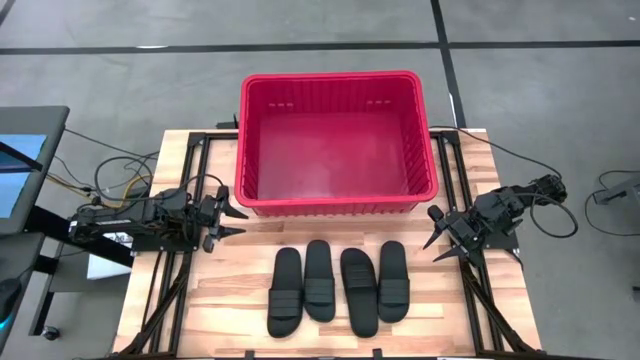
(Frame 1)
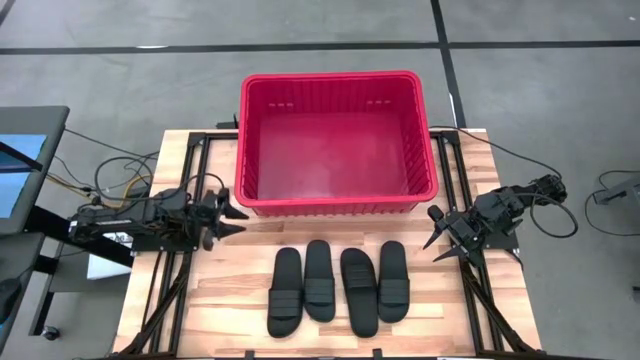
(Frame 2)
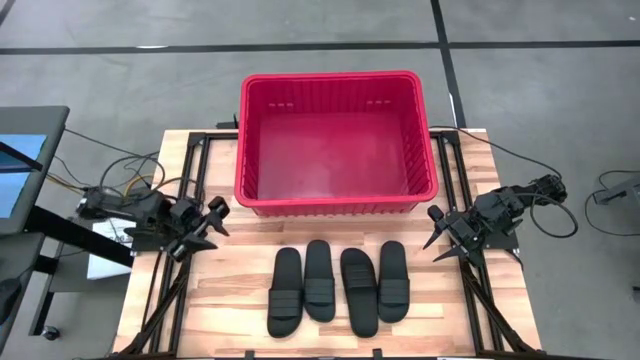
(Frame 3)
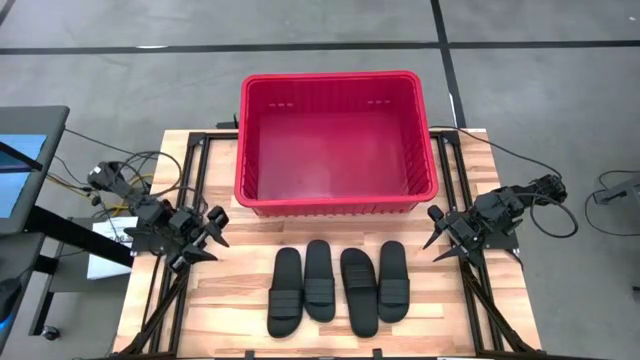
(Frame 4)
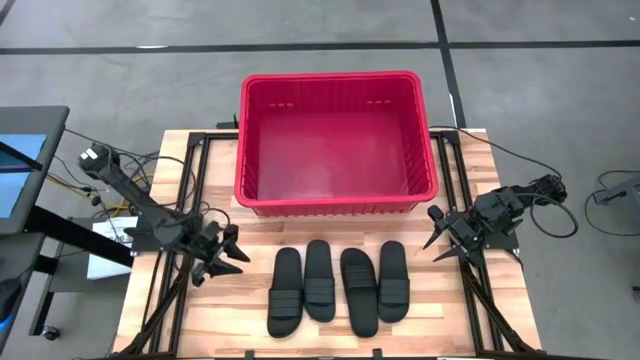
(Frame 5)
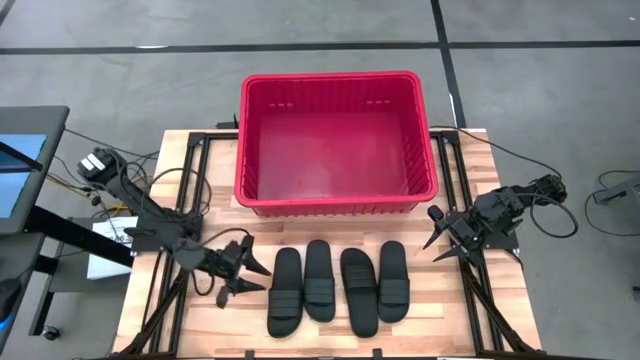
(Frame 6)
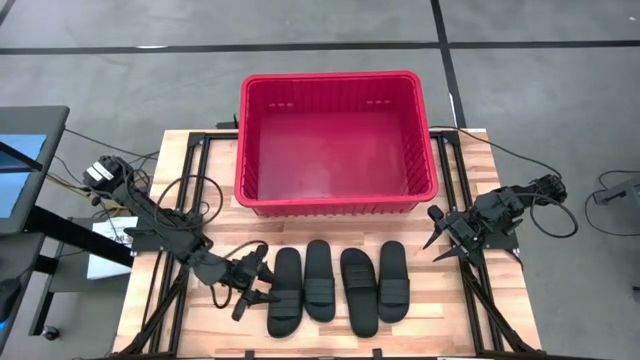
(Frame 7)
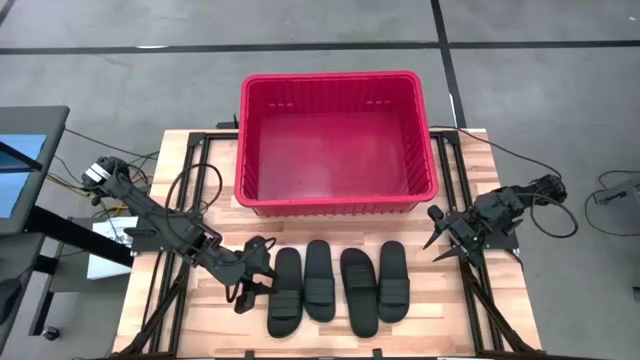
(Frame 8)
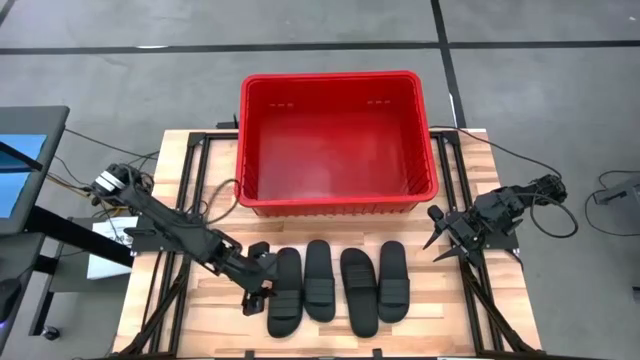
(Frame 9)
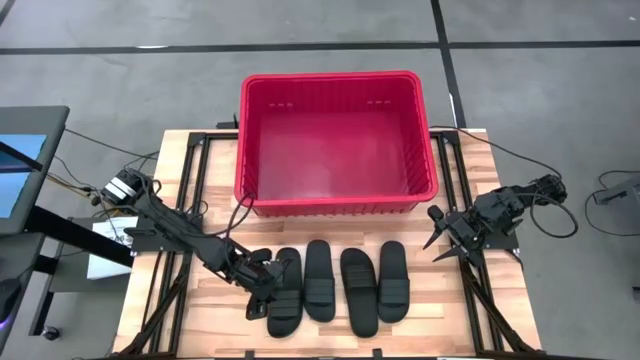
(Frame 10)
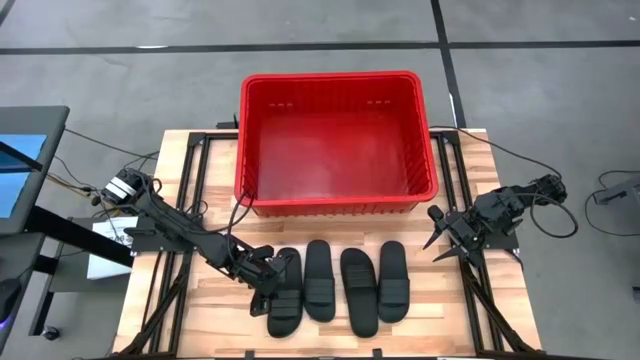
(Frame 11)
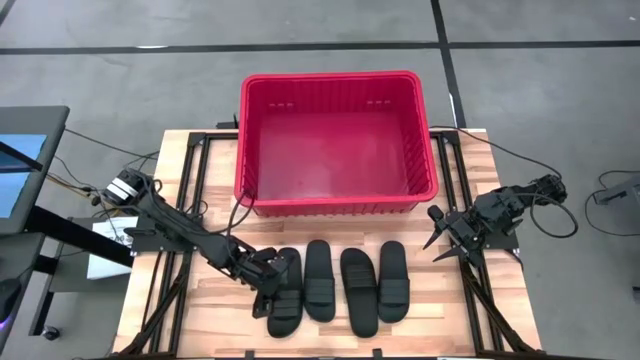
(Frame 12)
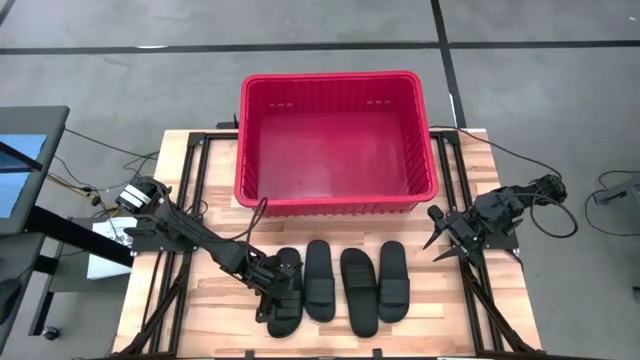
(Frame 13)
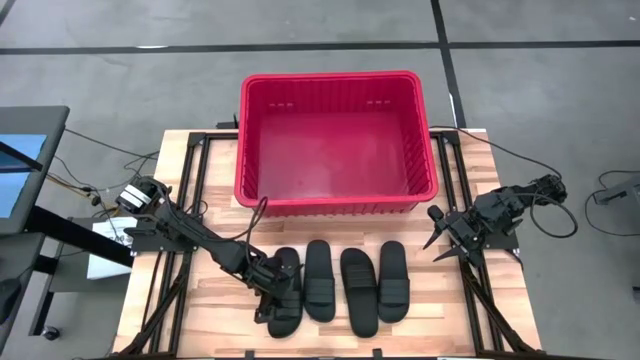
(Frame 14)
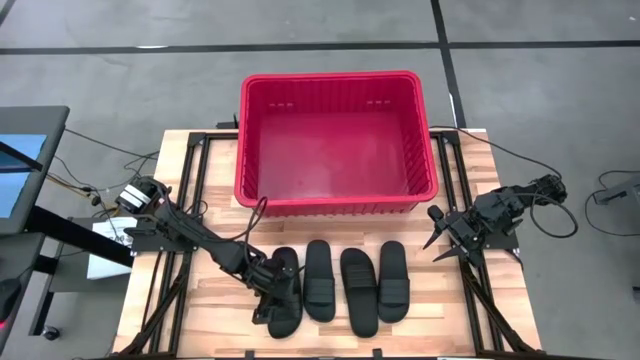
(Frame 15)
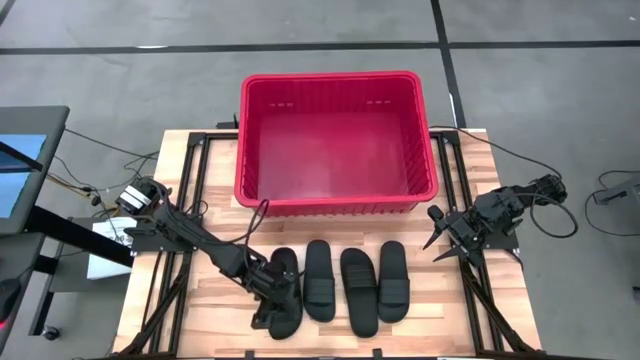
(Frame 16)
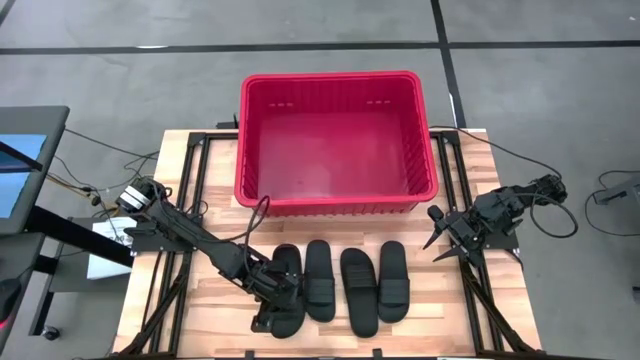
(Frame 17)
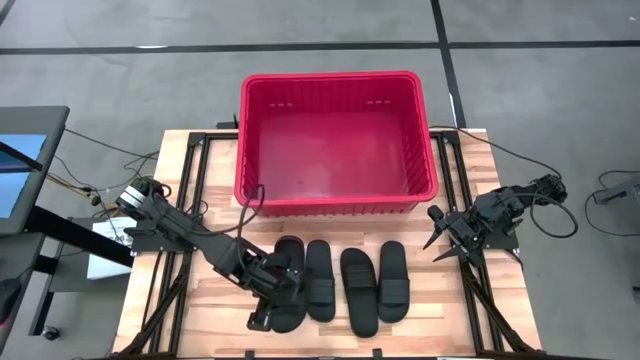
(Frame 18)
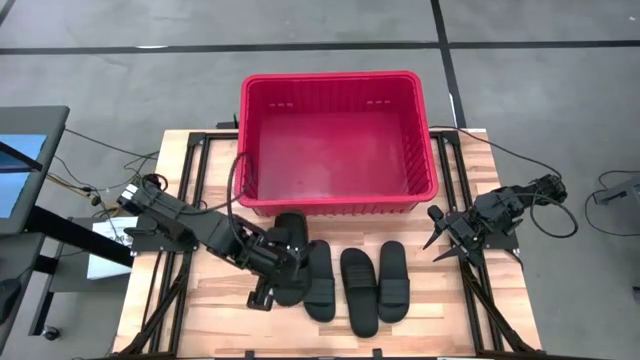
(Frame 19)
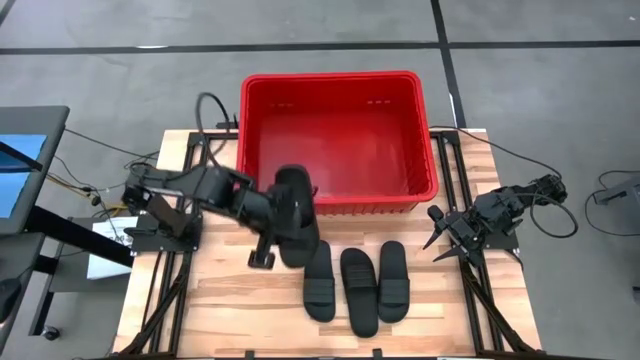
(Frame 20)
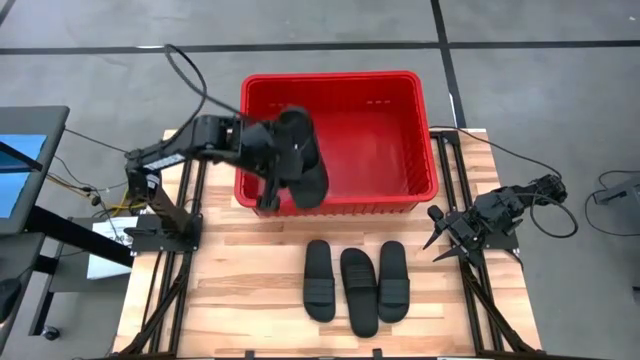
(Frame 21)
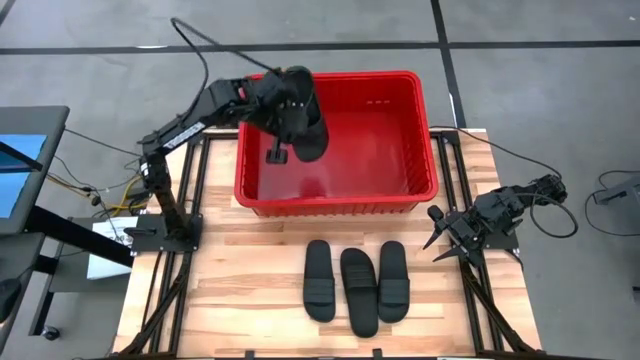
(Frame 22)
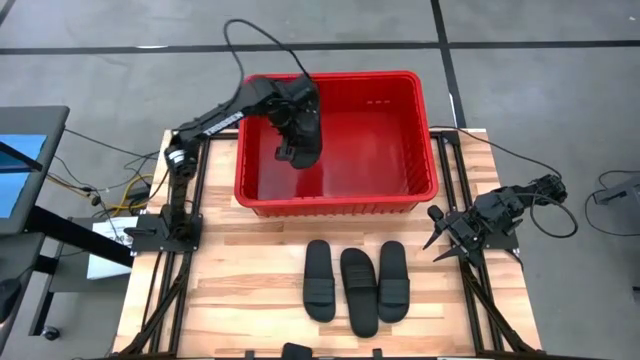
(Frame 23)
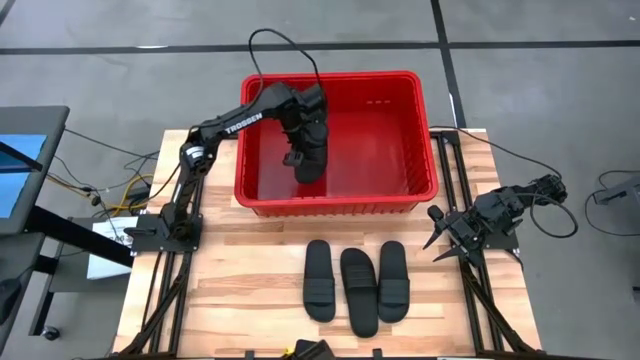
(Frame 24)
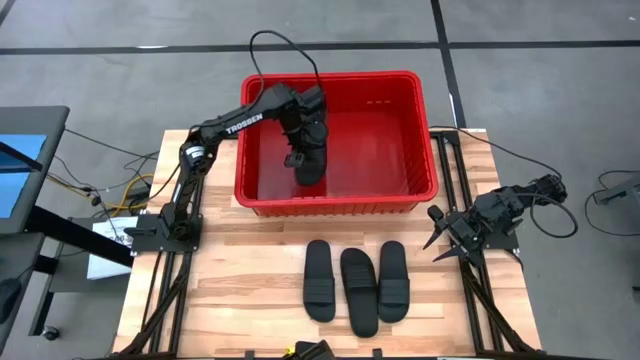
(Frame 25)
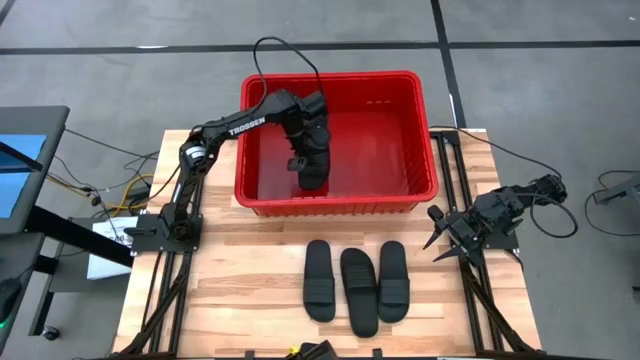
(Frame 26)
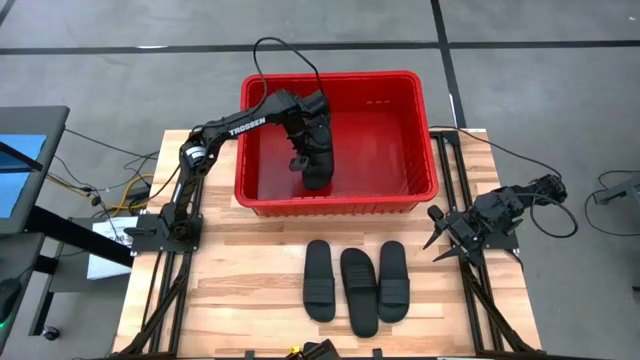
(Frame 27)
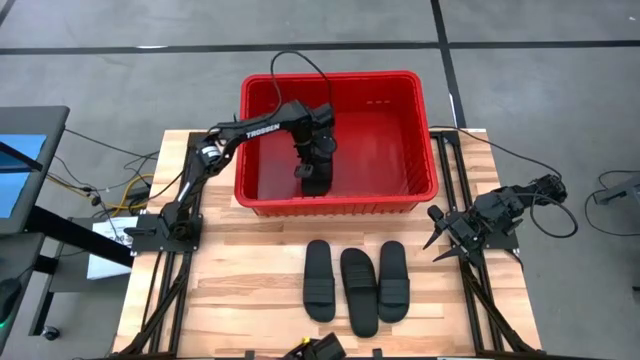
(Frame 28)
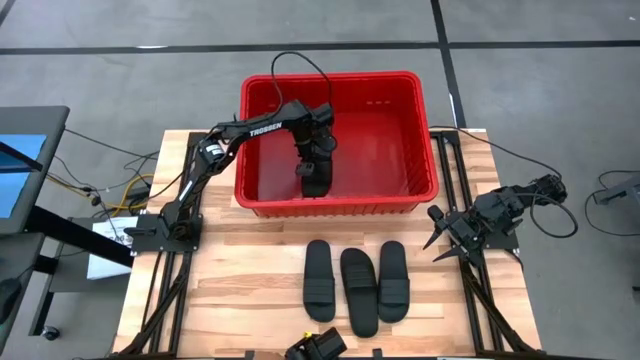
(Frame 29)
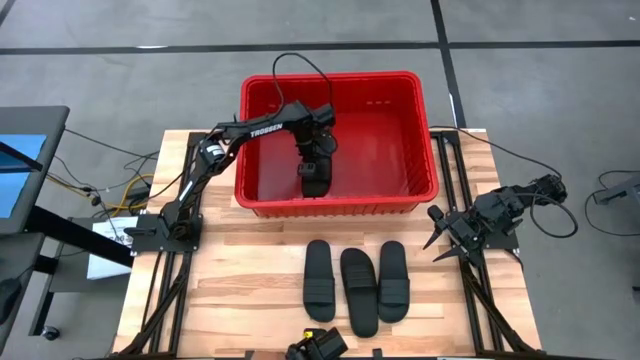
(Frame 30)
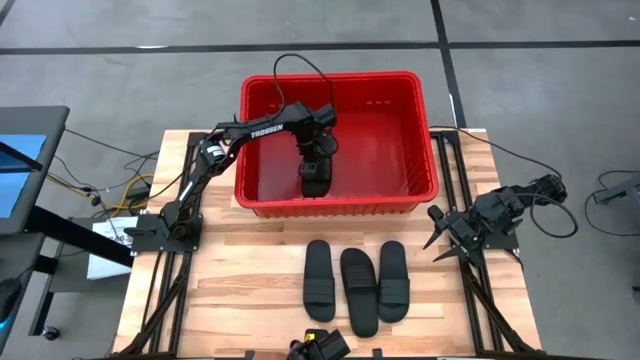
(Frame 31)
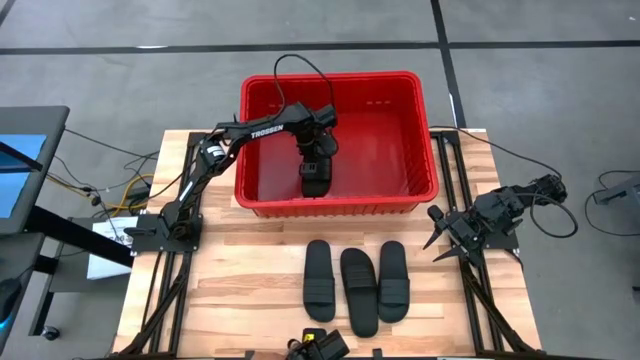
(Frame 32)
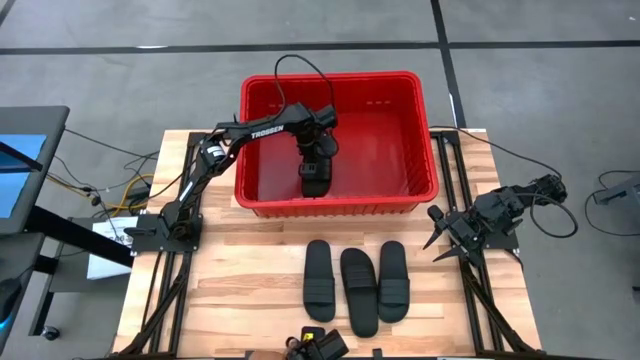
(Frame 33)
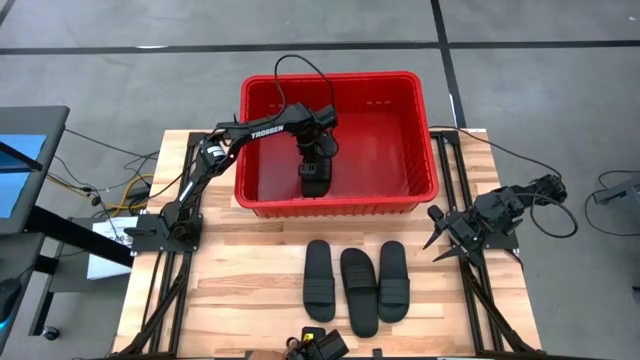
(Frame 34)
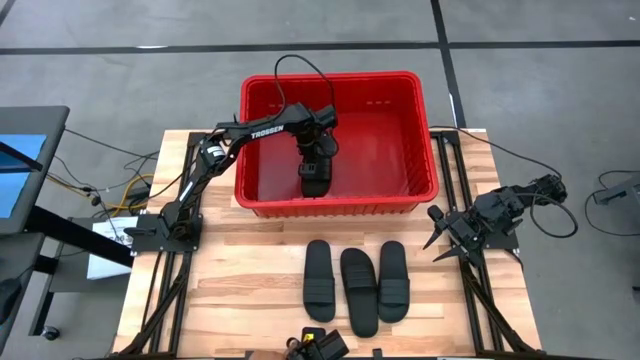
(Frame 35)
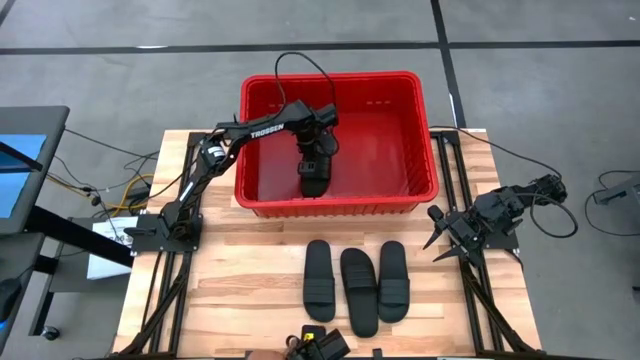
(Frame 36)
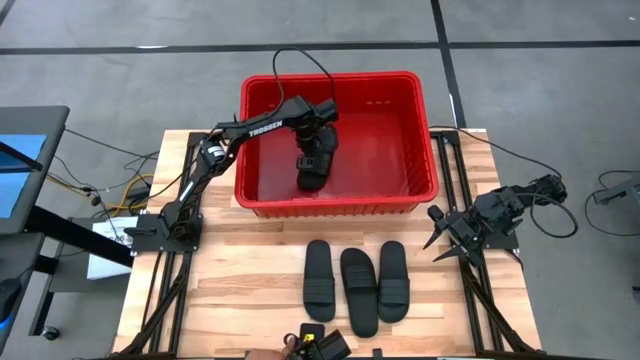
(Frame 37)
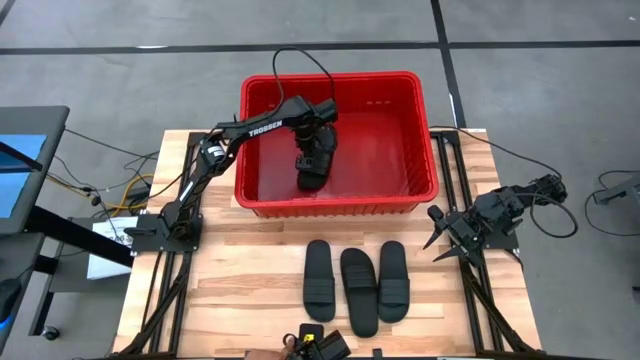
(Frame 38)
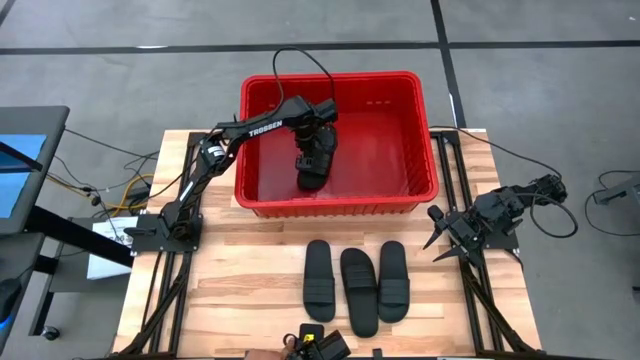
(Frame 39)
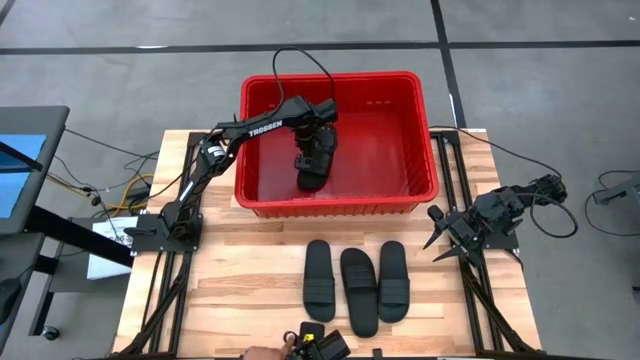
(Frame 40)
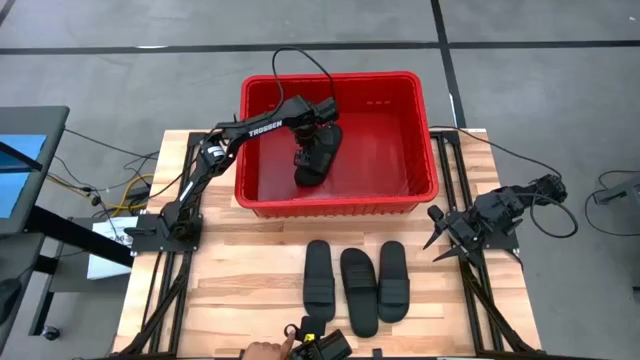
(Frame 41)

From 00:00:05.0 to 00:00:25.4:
Task: Pick and place slides into bin
Put the black slipper into the red bin
